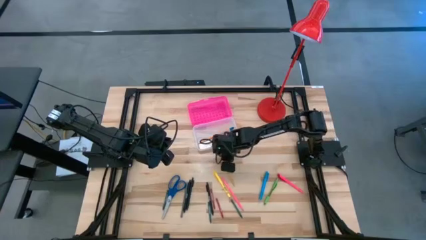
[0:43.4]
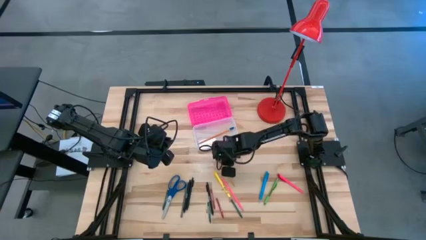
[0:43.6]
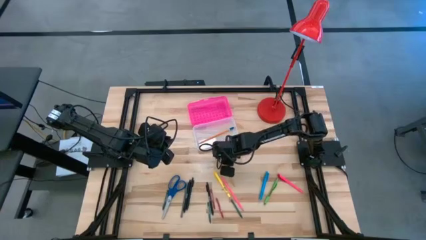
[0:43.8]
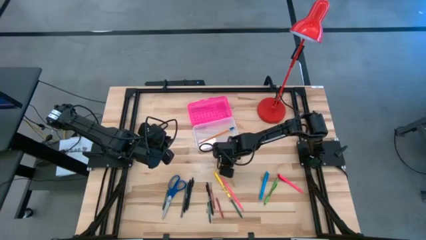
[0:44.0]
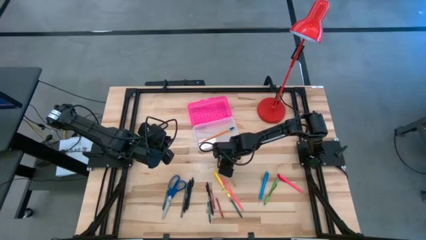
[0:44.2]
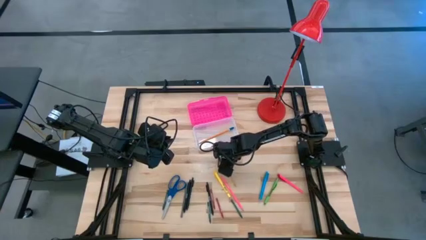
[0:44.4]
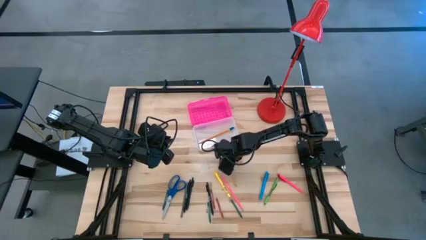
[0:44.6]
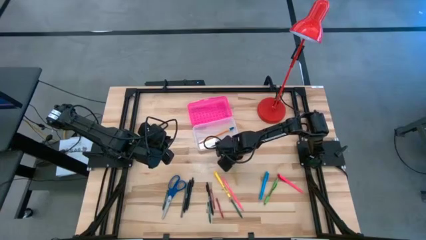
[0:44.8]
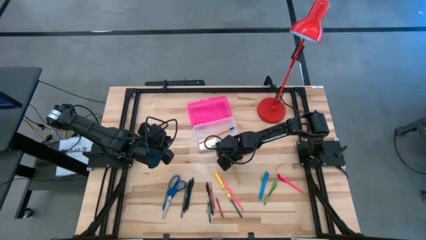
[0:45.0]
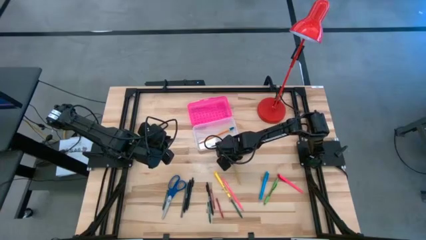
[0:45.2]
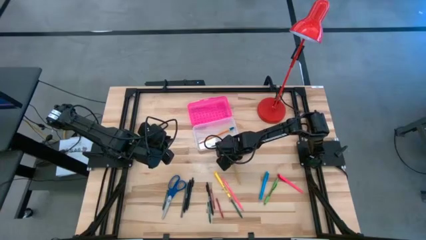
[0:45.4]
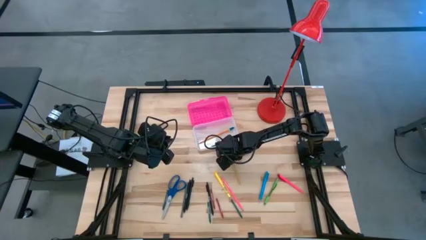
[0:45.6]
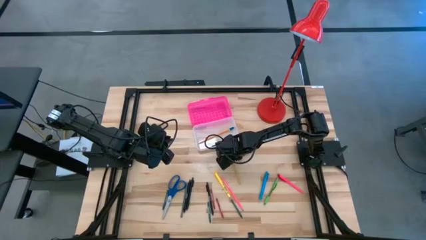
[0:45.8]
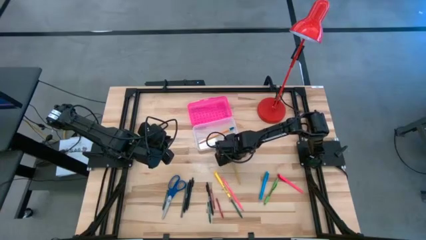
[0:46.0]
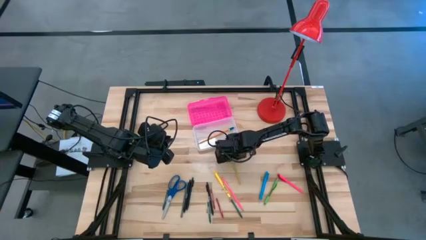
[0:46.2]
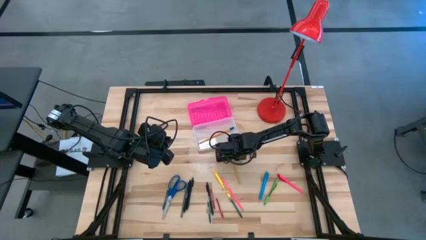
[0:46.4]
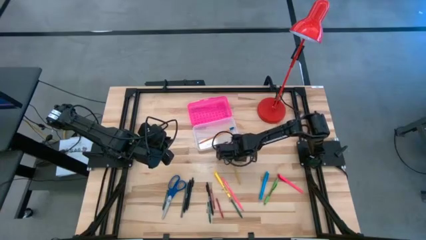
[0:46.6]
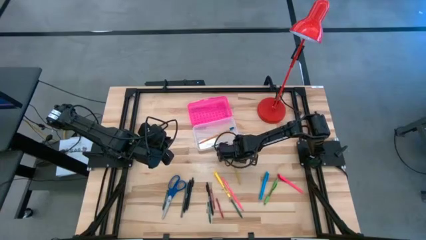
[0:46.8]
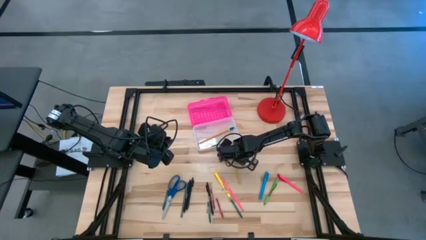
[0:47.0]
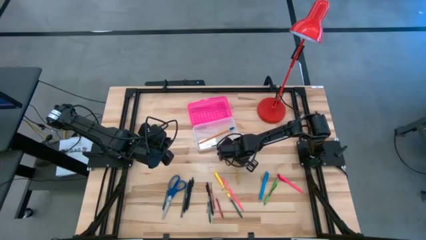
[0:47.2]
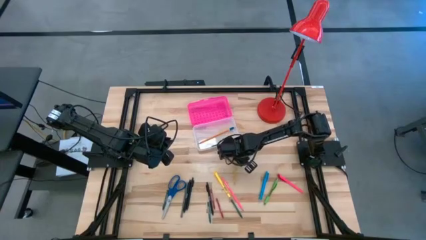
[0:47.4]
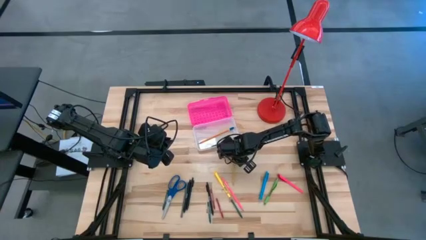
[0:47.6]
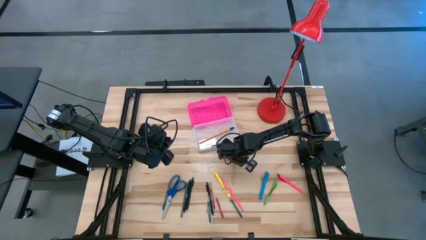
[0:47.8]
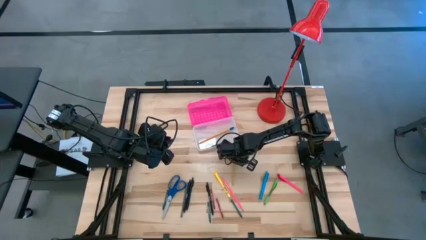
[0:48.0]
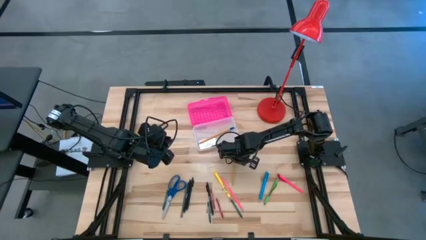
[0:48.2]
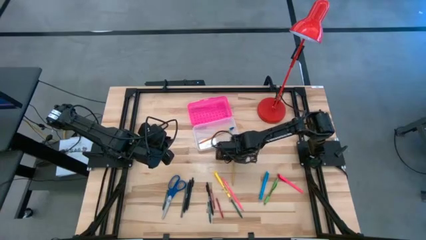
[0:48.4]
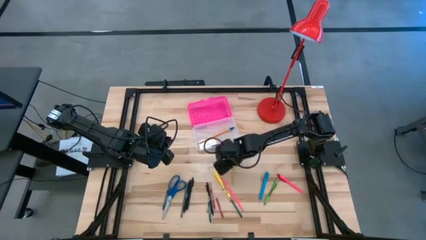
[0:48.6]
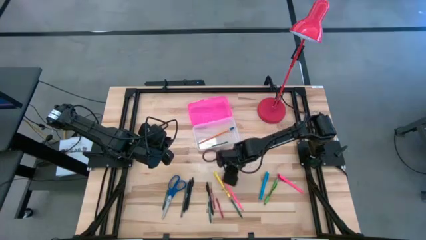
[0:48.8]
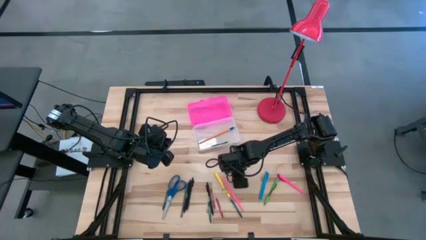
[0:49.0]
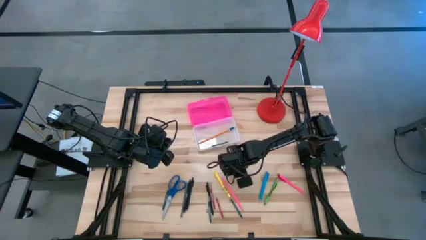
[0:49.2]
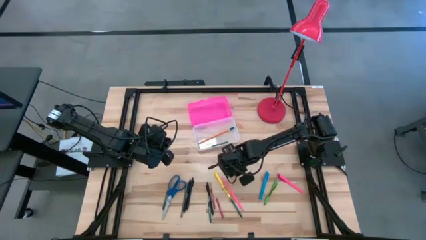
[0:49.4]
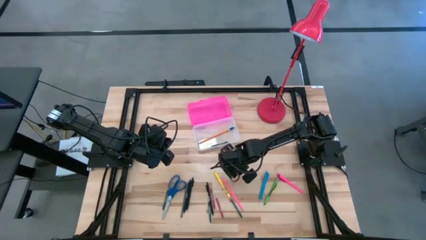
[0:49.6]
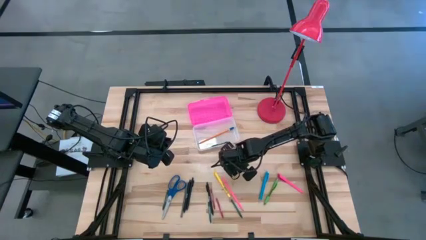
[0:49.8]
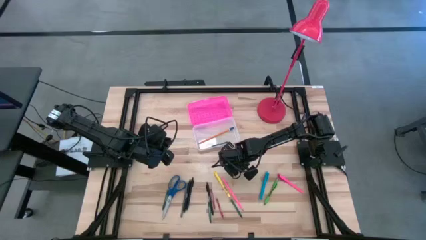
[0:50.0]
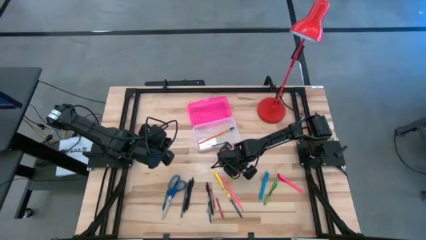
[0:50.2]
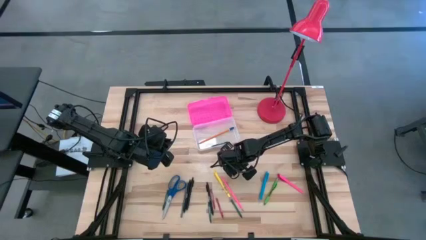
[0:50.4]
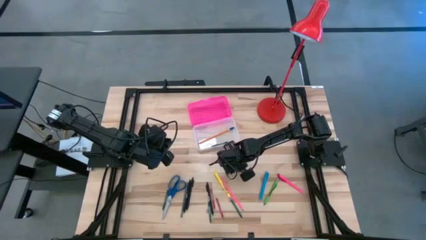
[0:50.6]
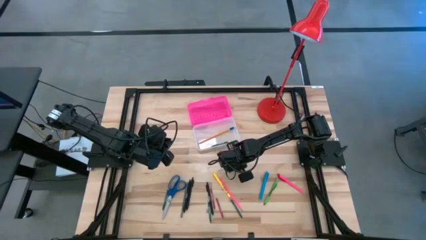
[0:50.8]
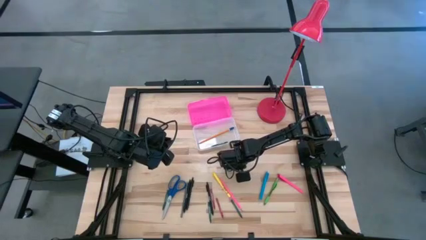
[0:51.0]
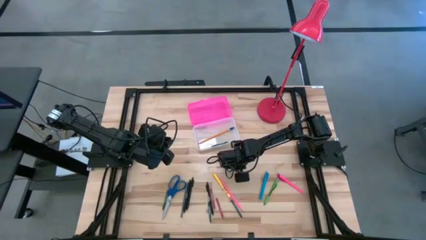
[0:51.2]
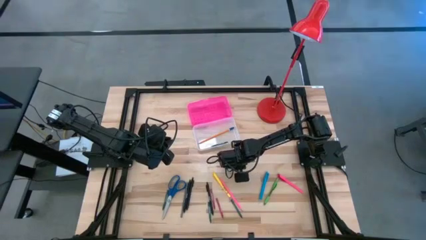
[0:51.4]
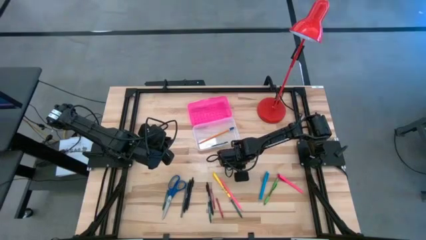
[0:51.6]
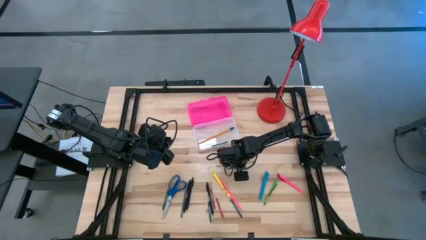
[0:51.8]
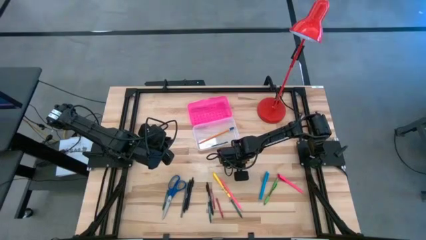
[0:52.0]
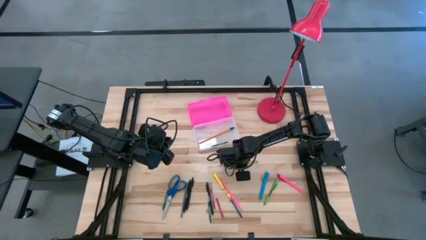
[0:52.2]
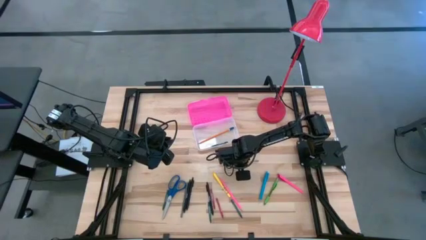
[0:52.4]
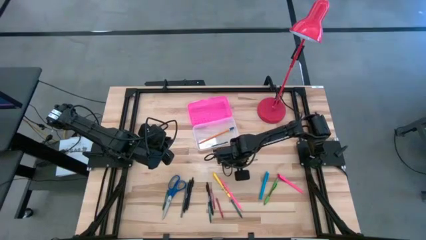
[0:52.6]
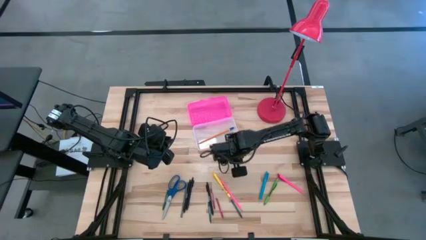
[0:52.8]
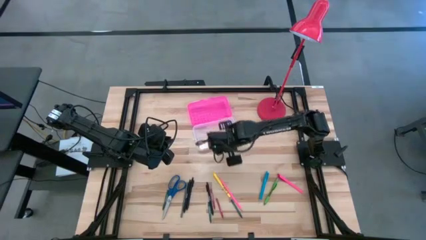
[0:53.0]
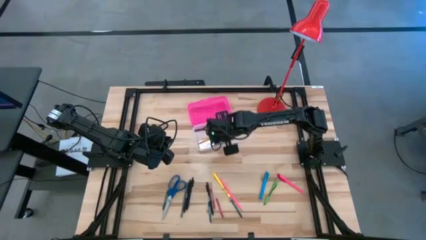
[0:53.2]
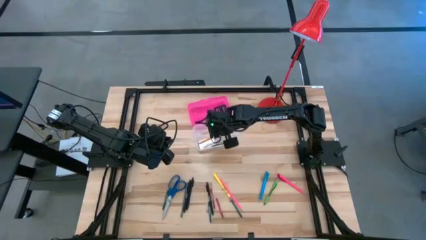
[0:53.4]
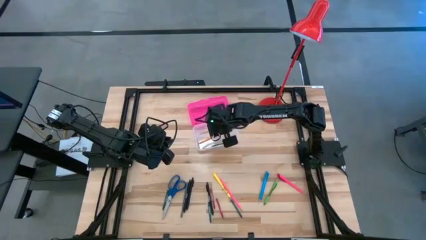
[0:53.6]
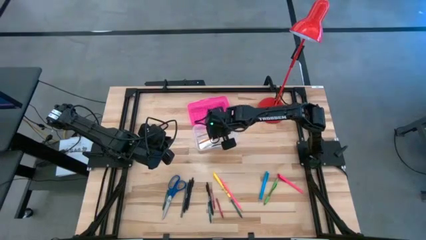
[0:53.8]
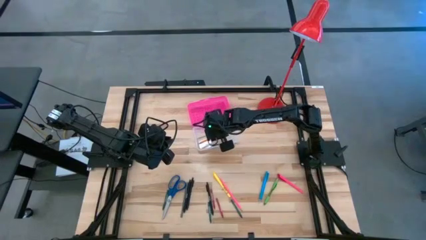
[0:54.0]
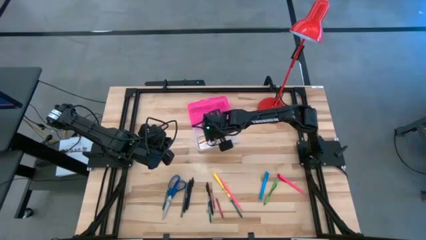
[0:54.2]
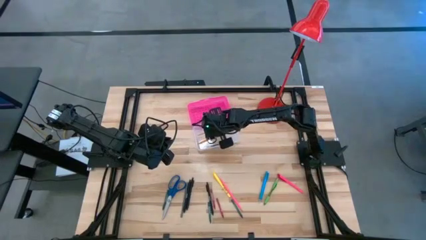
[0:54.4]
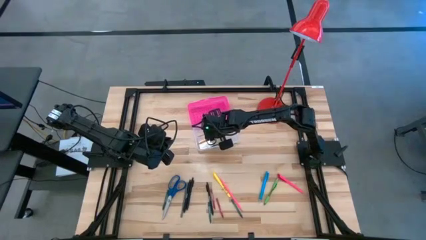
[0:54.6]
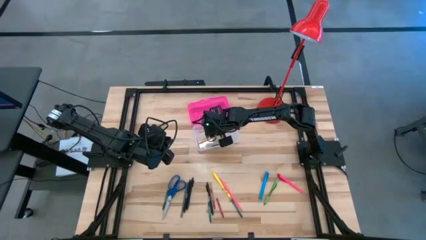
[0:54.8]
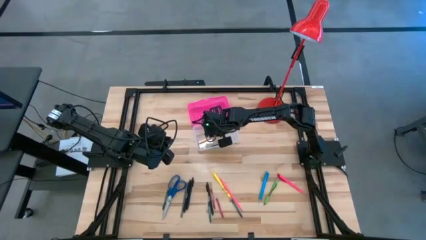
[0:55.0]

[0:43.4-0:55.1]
Task: Pick & place school supplies into a supply box
Put the yellow pencil into the pink supply box

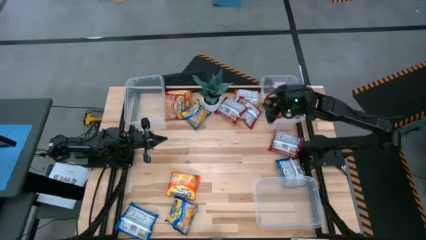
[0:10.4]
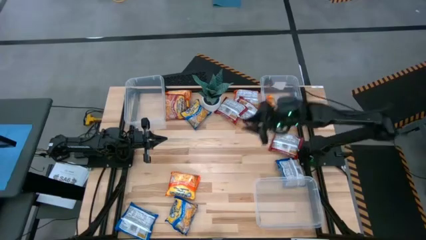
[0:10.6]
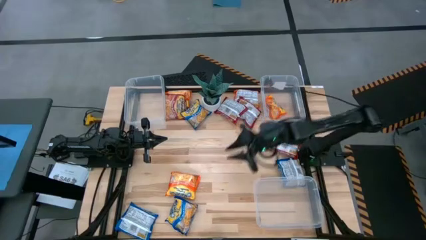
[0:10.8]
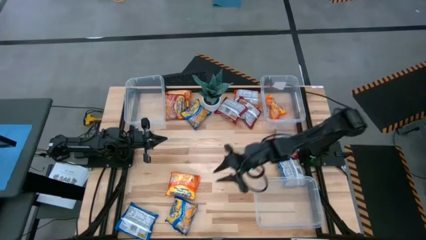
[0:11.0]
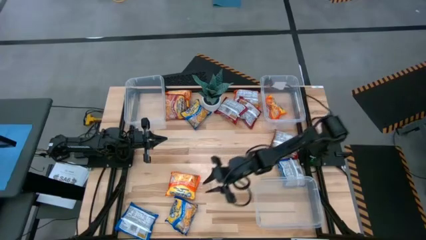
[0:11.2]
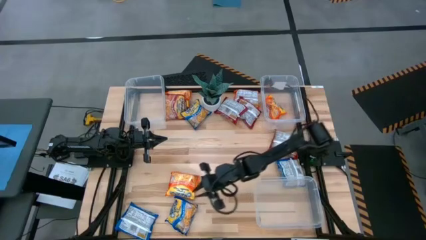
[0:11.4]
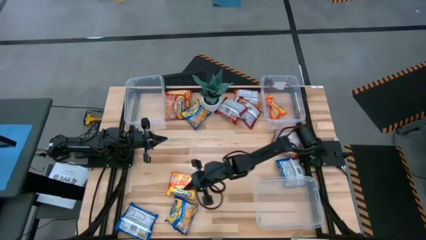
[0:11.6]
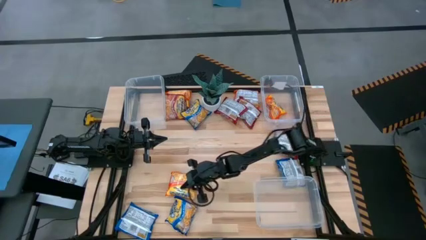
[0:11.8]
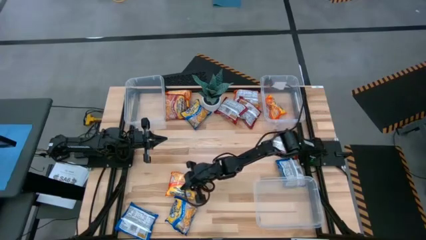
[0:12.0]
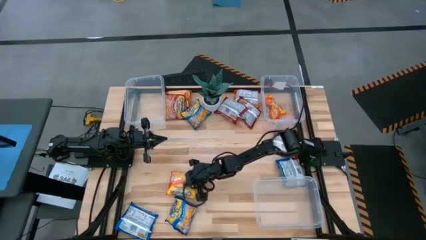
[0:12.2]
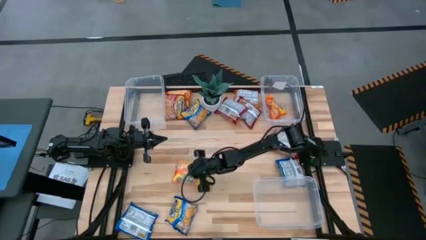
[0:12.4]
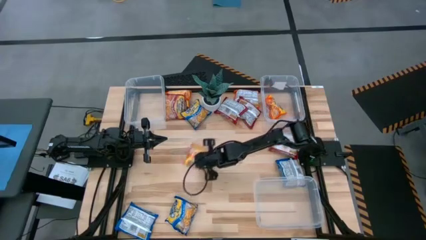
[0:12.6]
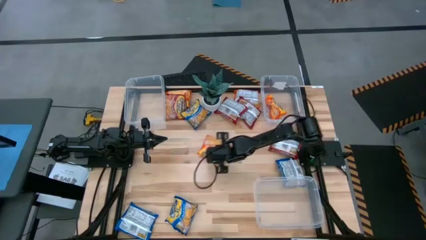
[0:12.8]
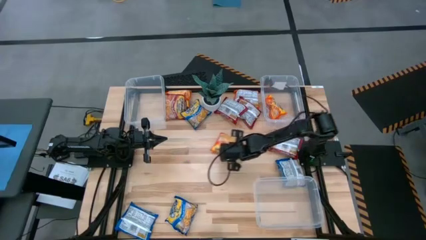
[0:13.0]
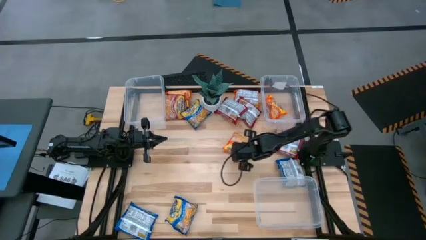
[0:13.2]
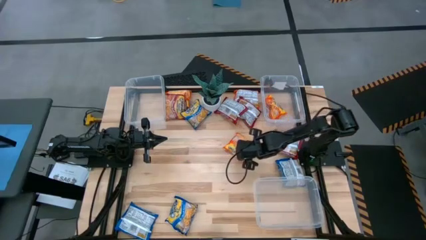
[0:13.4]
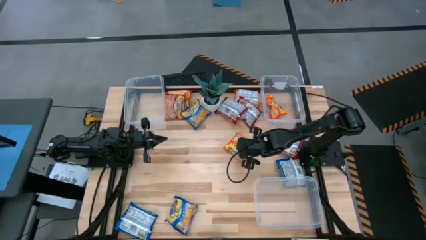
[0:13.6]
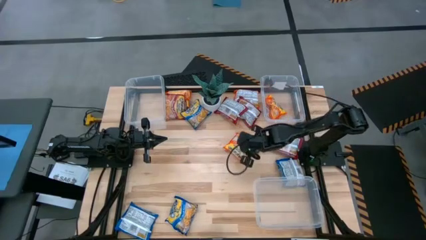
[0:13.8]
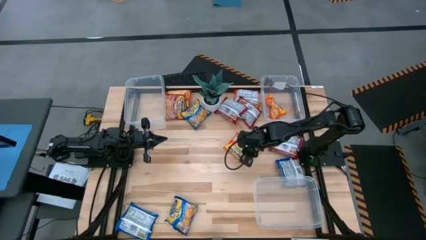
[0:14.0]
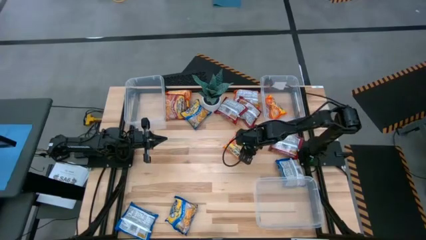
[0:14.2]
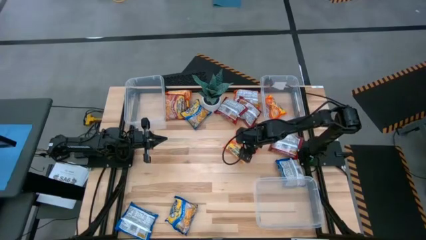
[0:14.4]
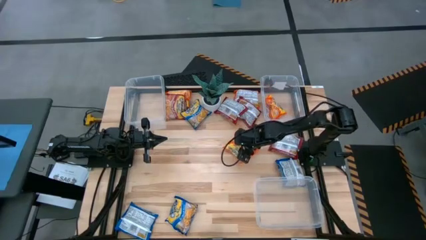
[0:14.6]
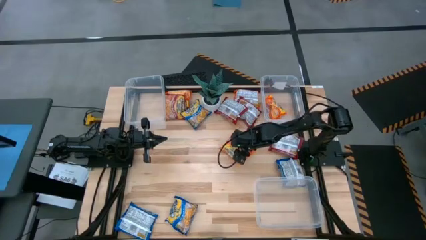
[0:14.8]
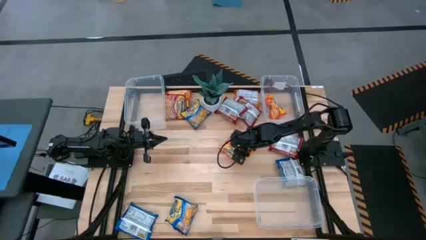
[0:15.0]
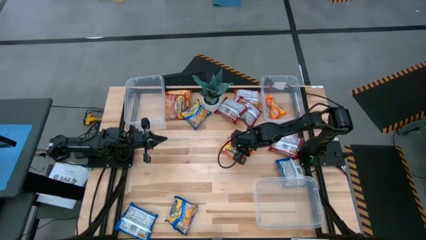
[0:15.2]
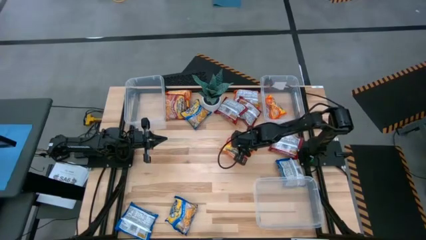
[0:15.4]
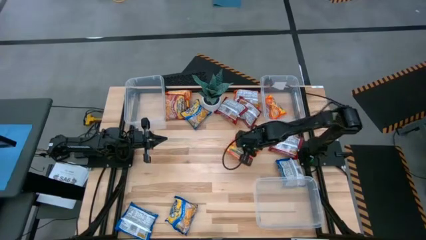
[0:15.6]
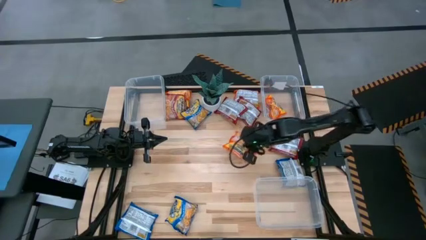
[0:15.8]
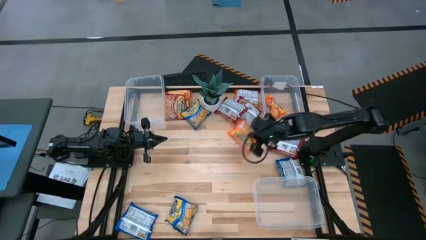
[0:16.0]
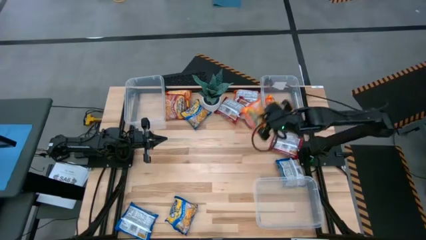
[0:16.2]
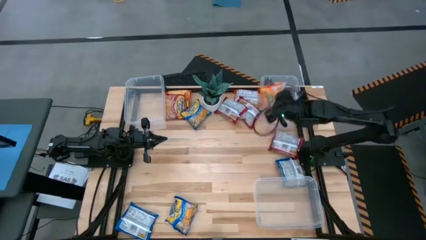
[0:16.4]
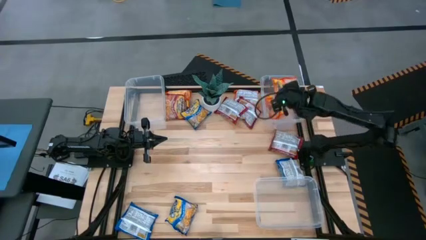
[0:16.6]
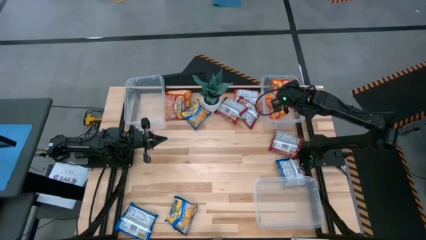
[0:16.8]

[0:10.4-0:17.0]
Task: Sort Maruchan noodles
Put the orange noodle pack in the top right transparent bin
